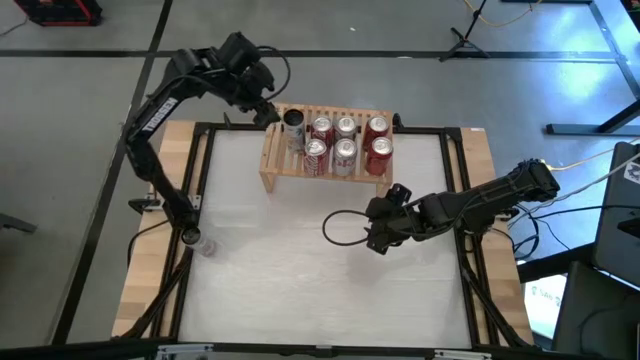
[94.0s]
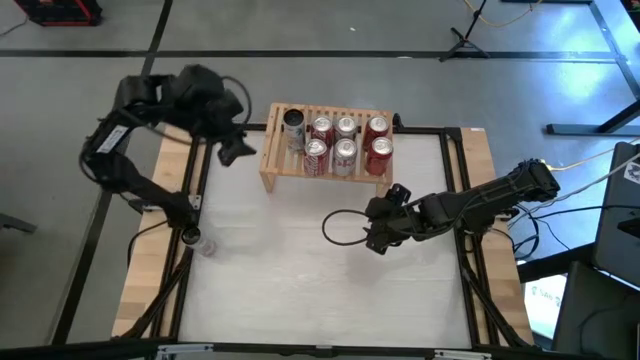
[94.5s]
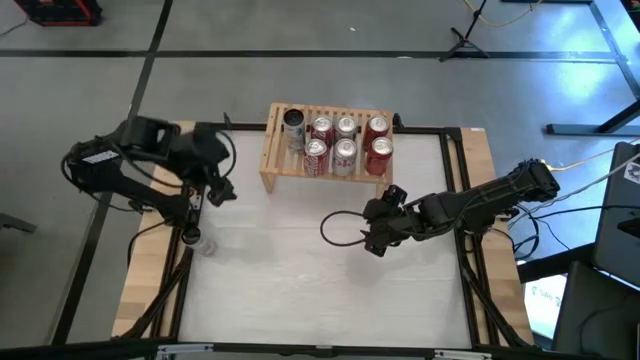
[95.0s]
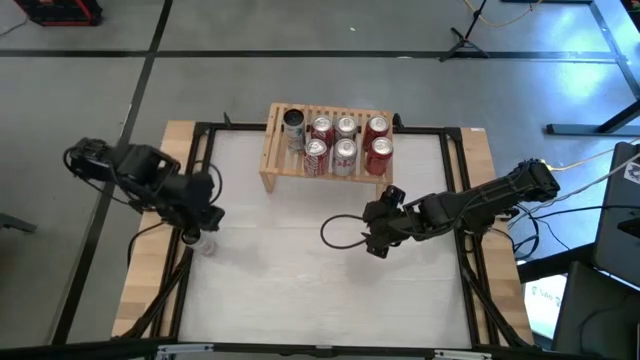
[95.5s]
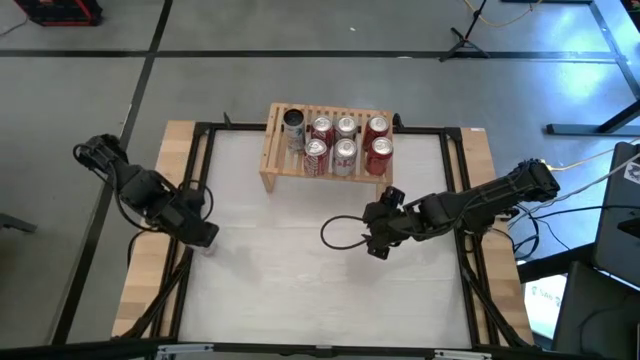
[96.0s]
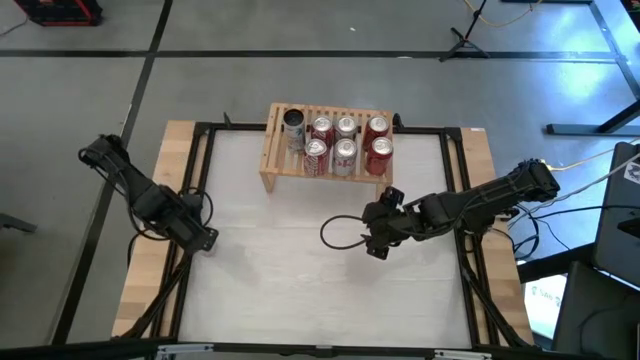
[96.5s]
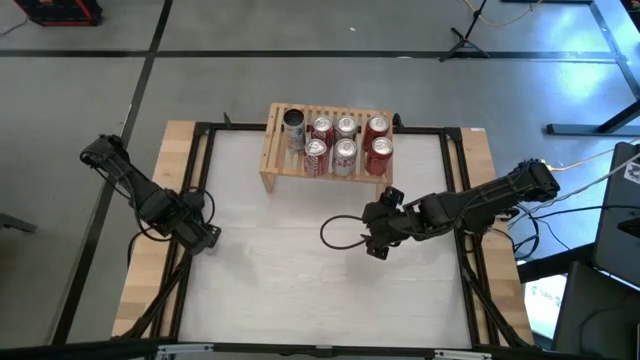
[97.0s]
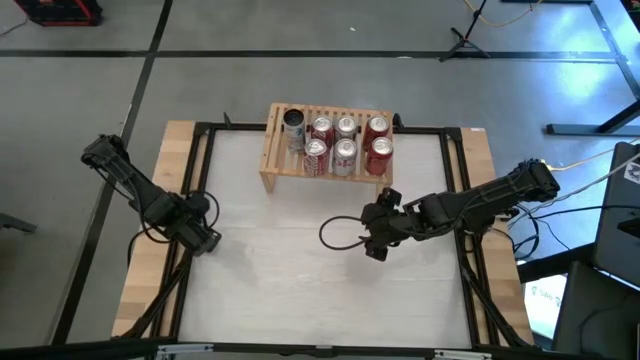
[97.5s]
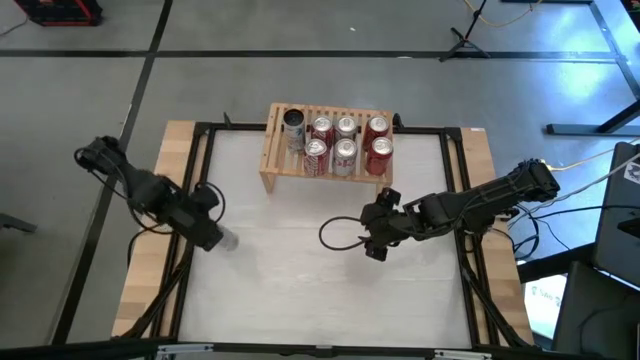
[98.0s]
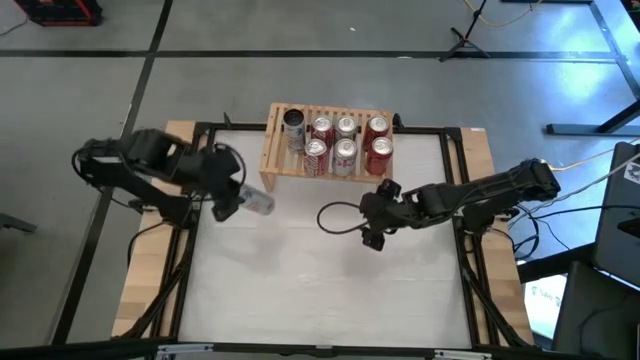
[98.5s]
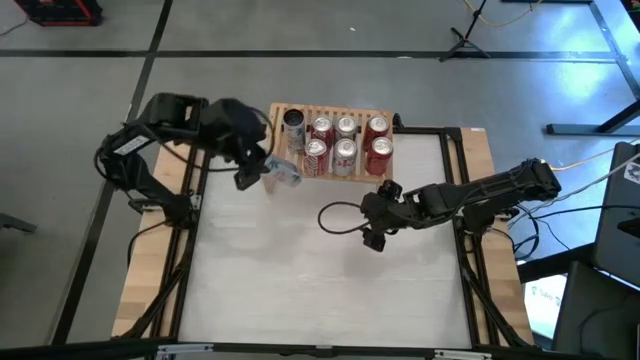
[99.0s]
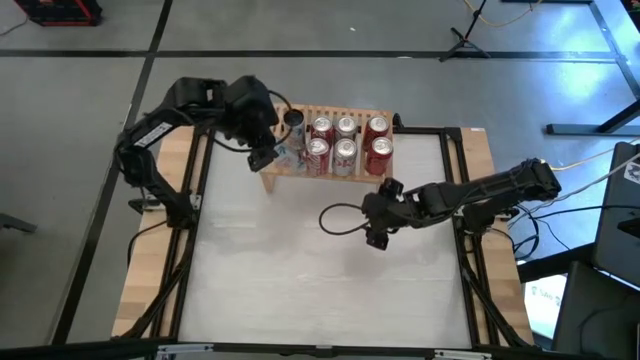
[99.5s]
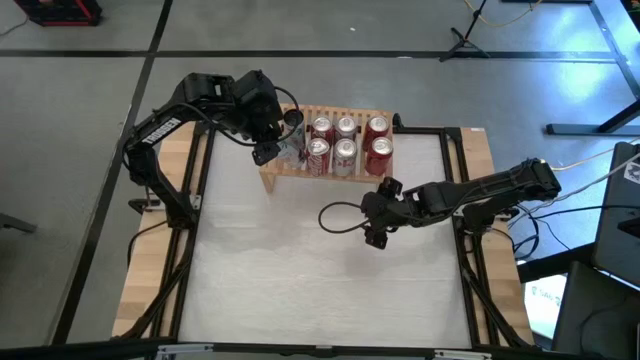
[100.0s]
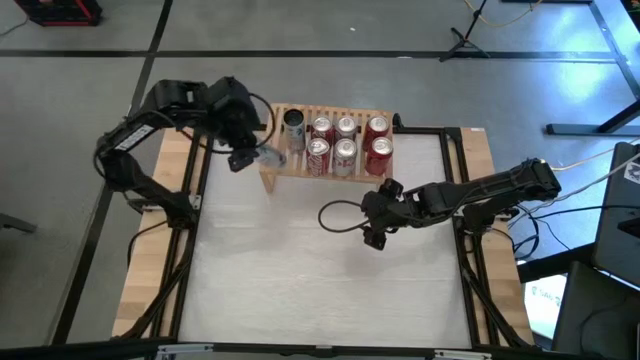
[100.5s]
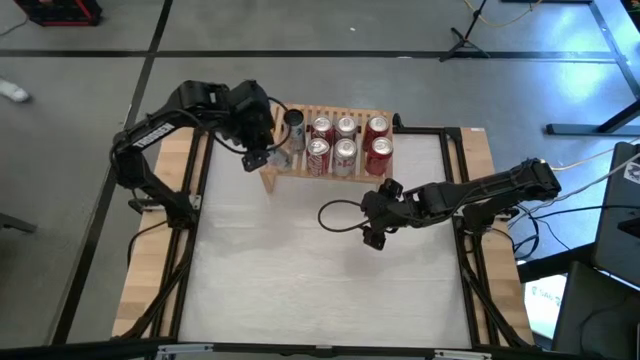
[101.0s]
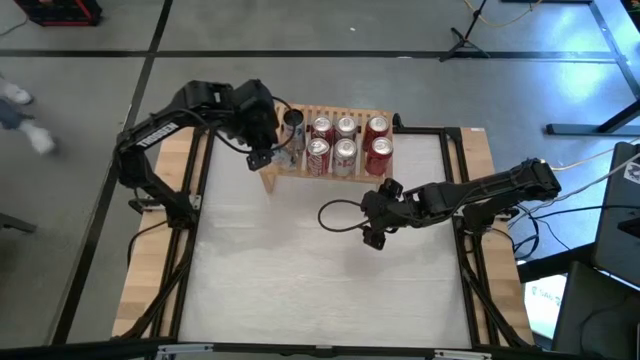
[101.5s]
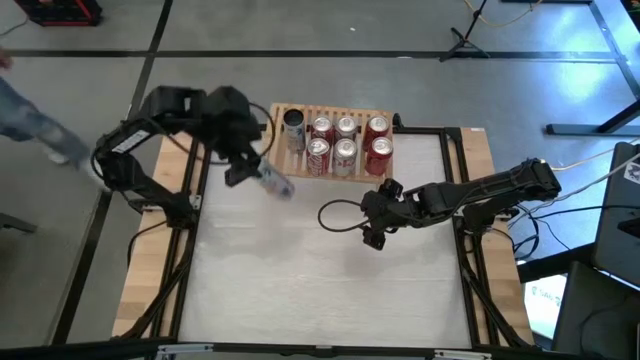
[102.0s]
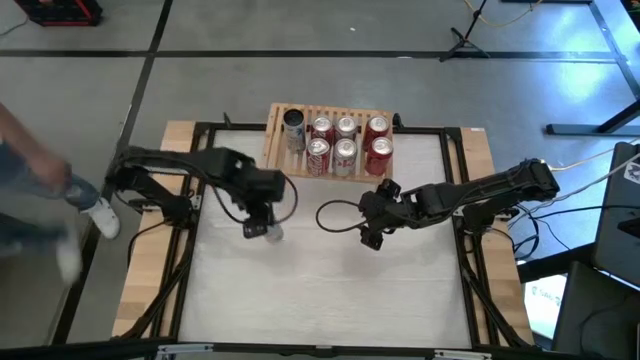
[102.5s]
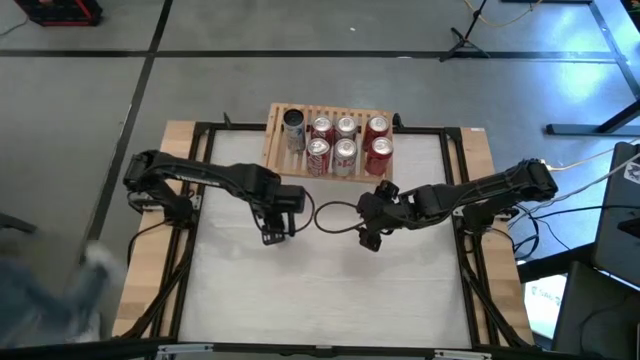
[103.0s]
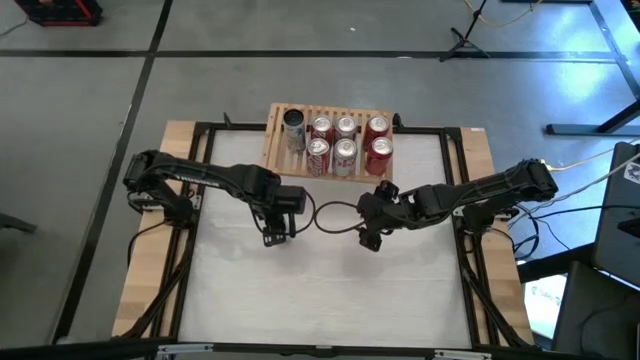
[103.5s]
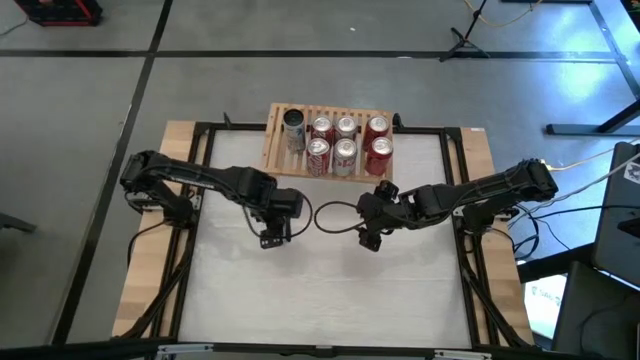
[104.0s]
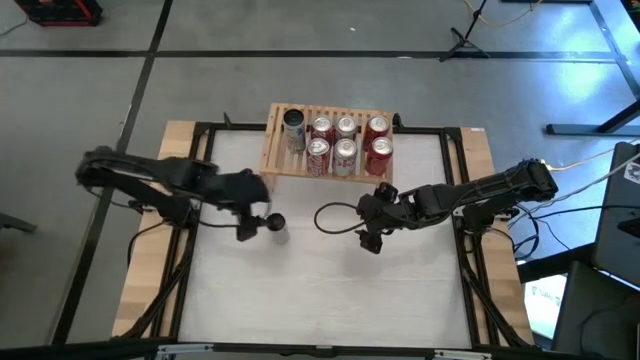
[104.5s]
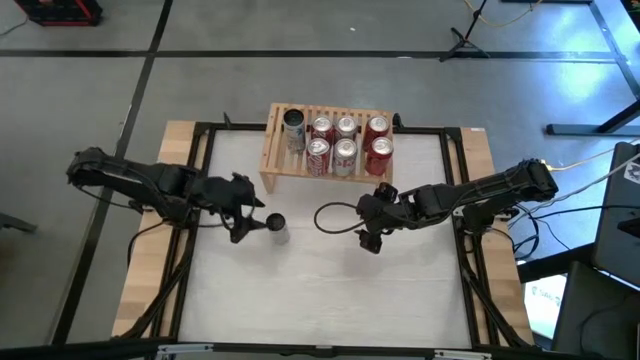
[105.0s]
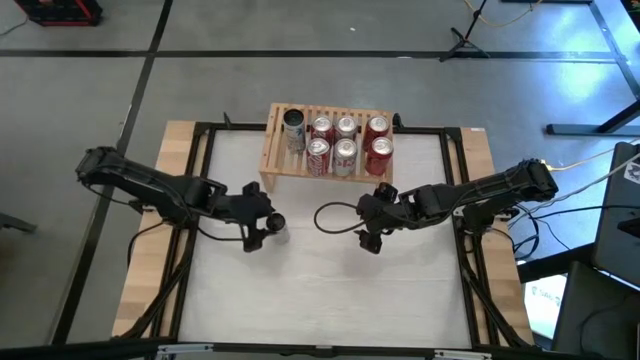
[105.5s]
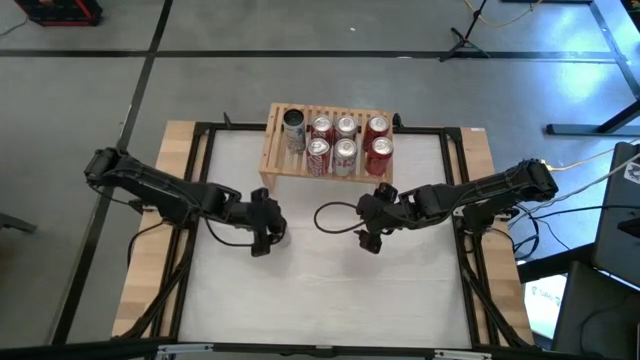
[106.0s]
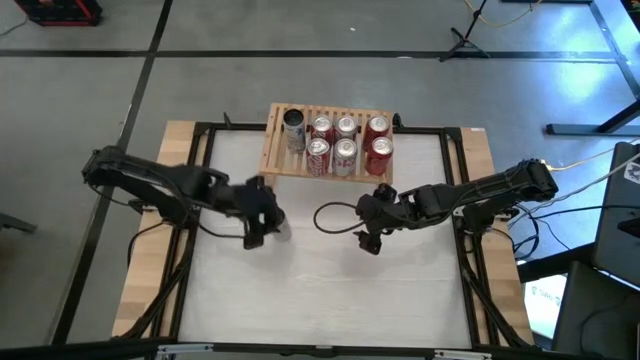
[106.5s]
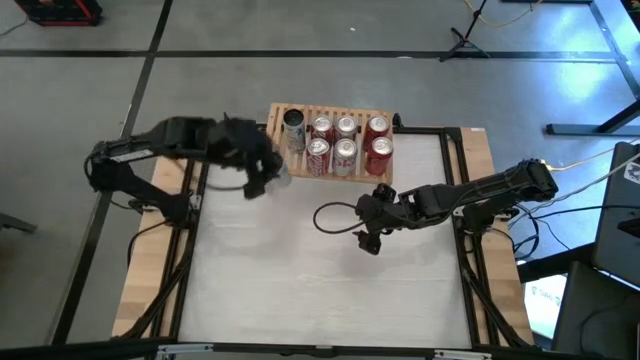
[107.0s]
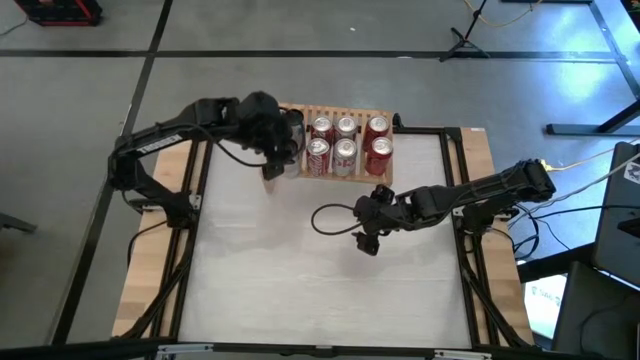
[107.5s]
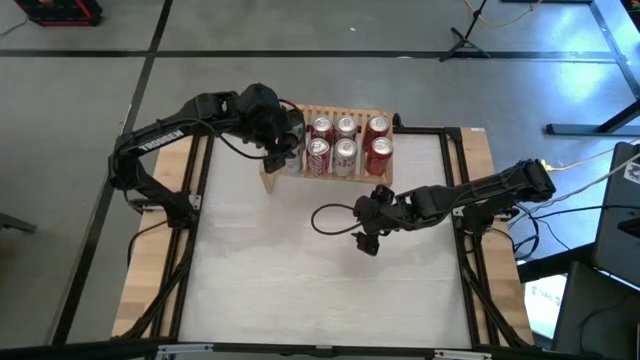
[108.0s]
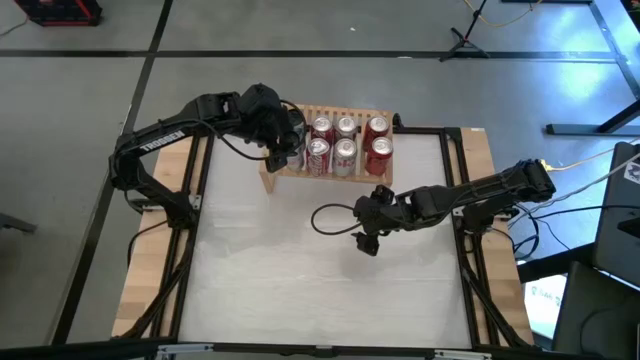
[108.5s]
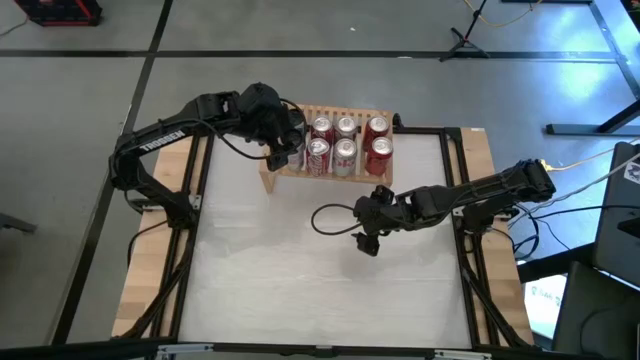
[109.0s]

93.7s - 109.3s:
Task: Place canned beverage on shelf
Put the white soda can on the shelf aligned with the other white soda can

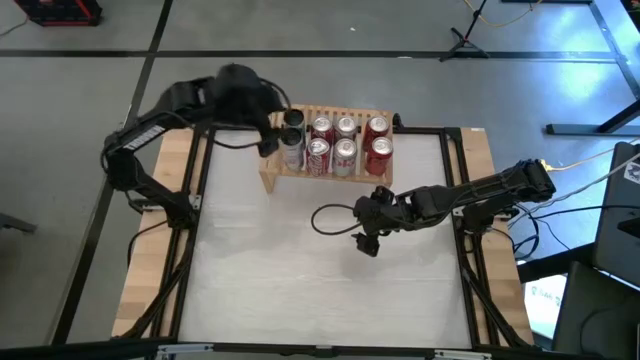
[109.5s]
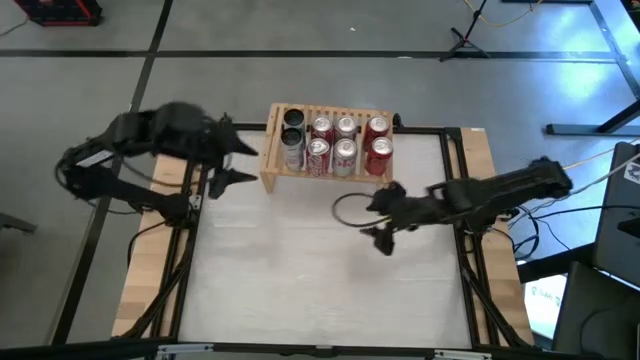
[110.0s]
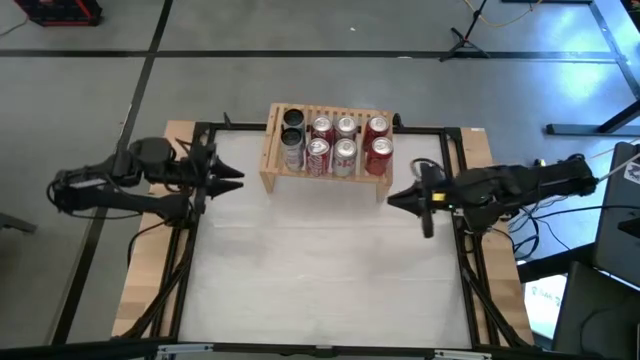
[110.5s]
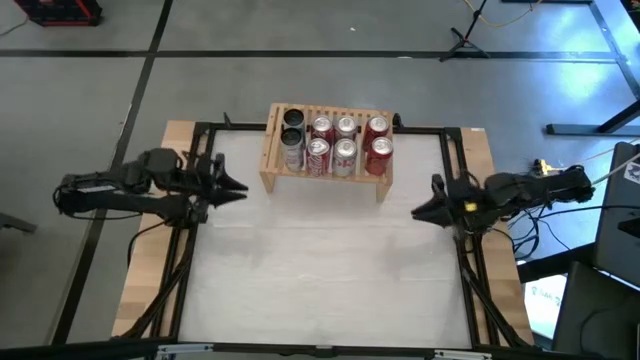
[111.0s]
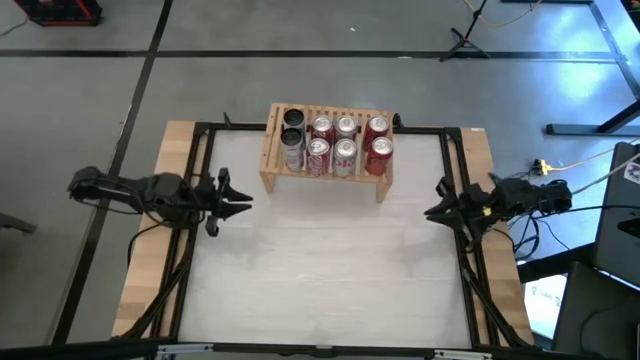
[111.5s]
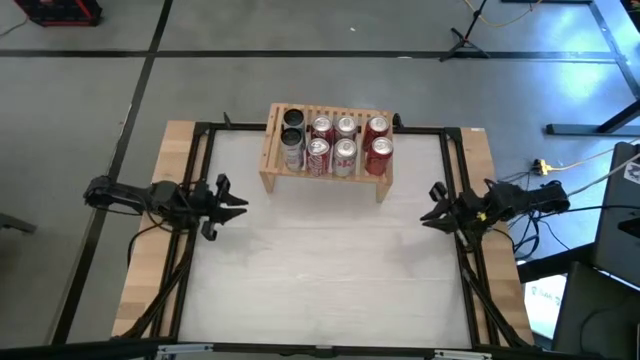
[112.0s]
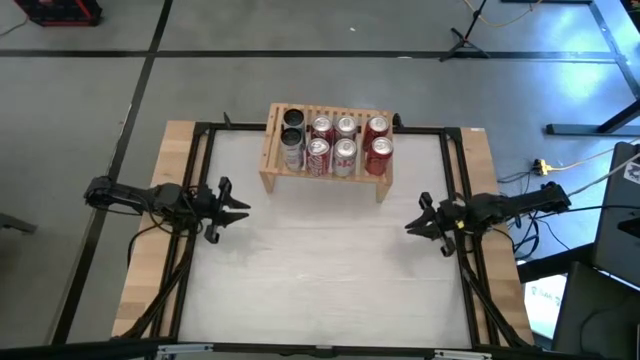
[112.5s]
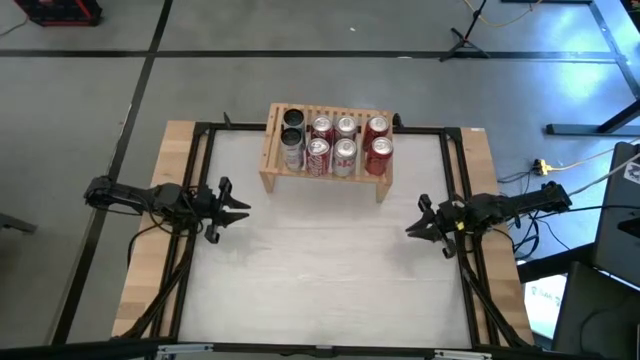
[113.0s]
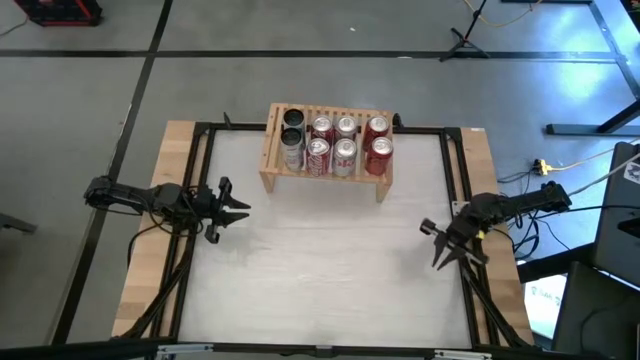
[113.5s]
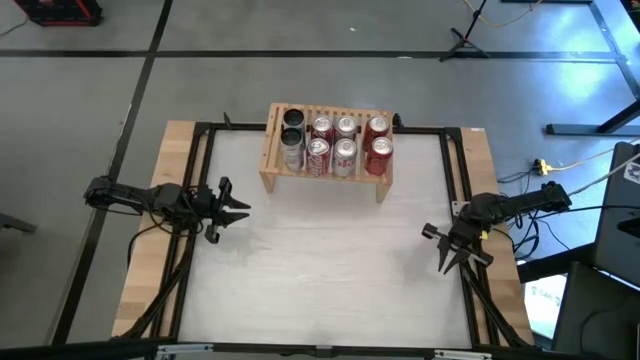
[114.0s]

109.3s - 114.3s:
Return to Home Position

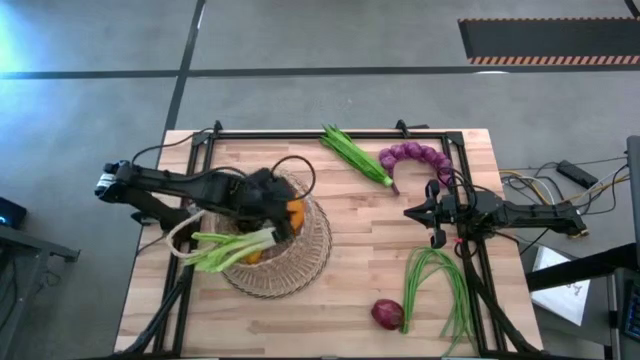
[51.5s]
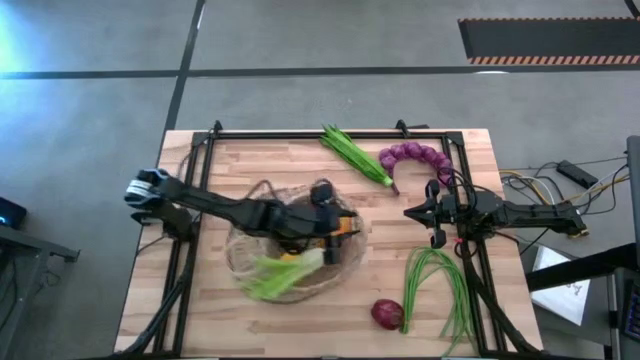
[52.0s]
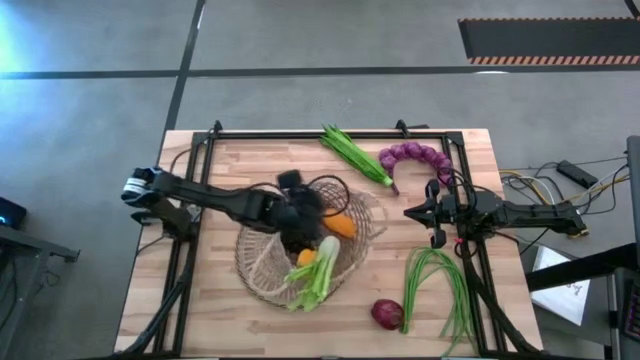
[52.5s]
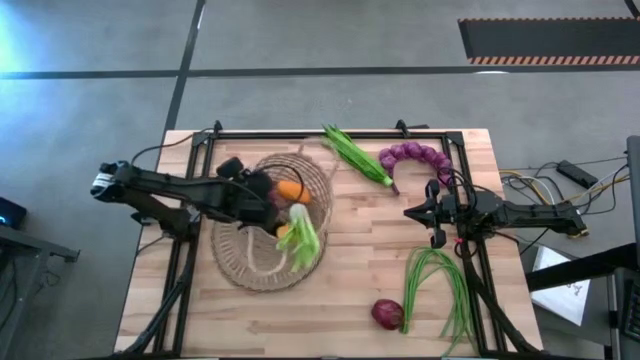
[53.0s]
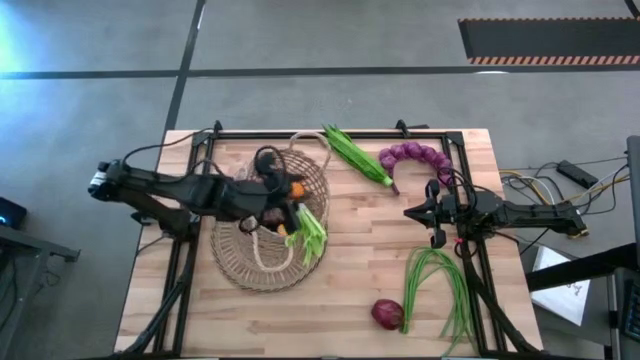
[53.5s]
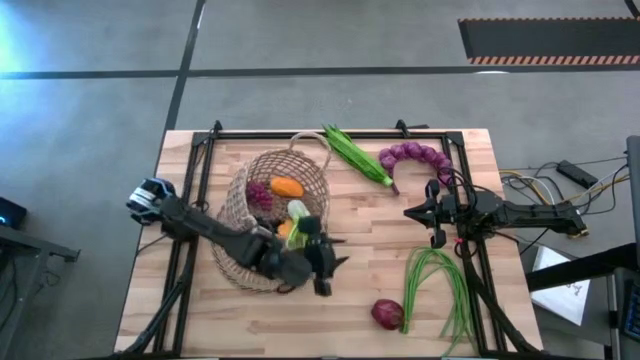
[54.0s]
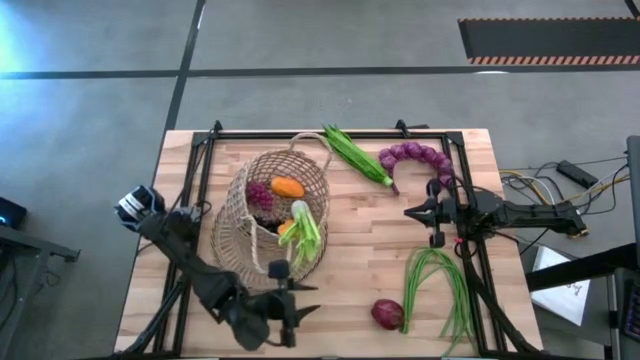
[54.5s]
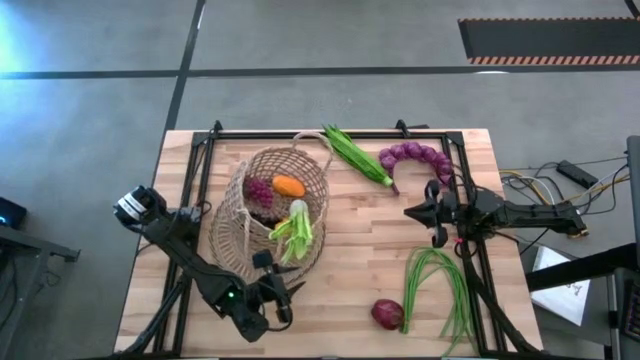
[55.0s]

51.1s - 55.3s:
Task: Build produce basket
Adjust the basket
